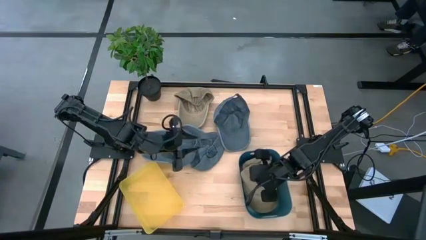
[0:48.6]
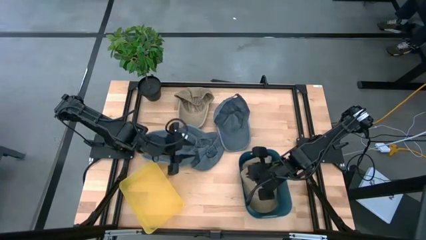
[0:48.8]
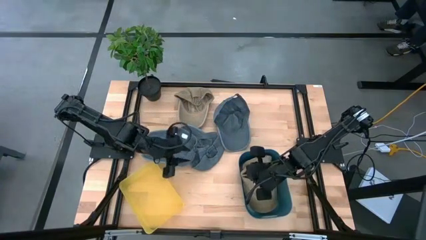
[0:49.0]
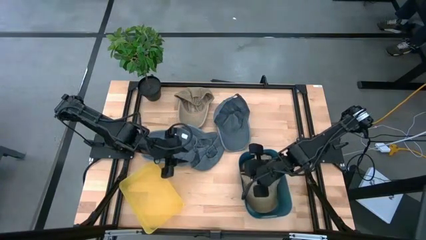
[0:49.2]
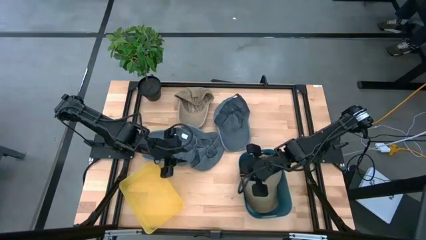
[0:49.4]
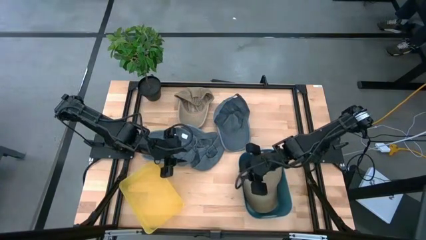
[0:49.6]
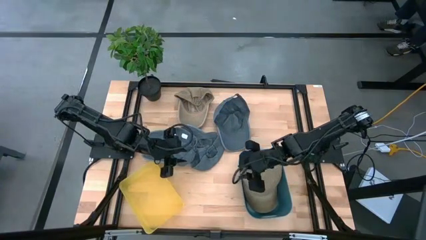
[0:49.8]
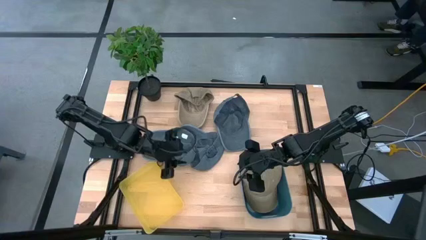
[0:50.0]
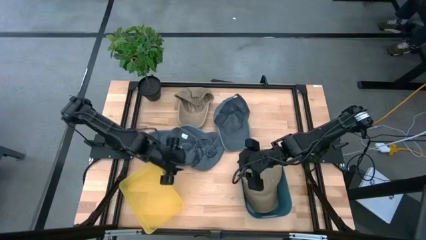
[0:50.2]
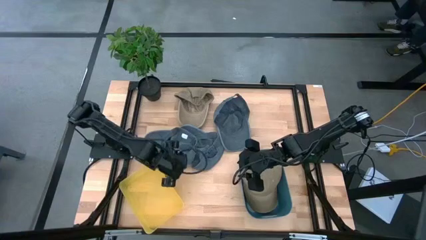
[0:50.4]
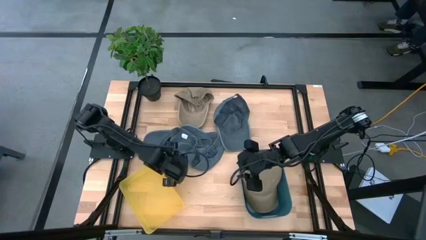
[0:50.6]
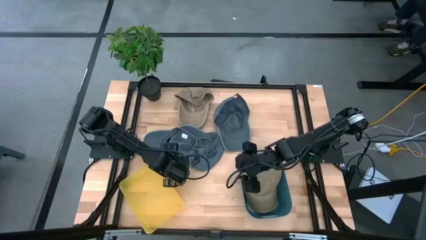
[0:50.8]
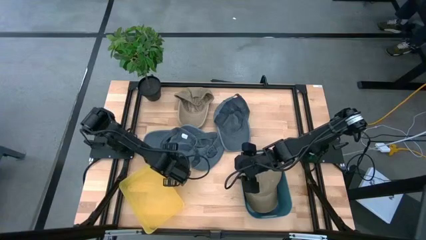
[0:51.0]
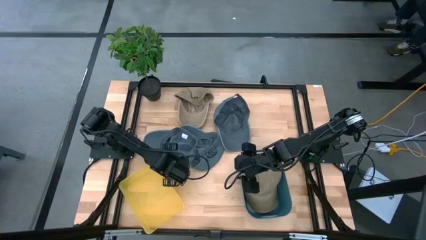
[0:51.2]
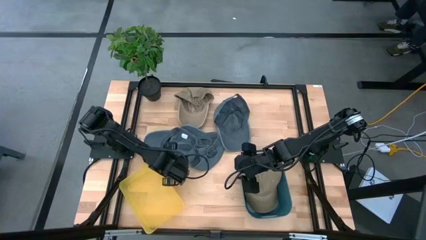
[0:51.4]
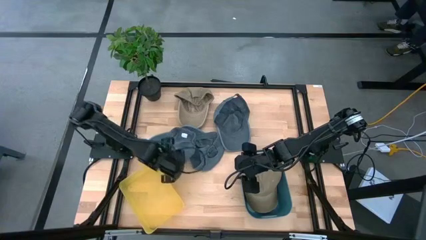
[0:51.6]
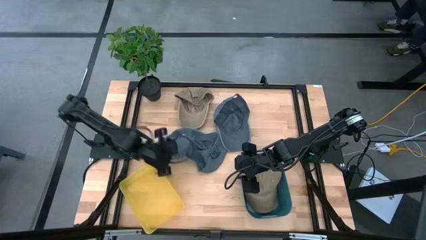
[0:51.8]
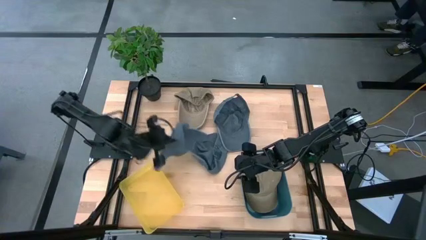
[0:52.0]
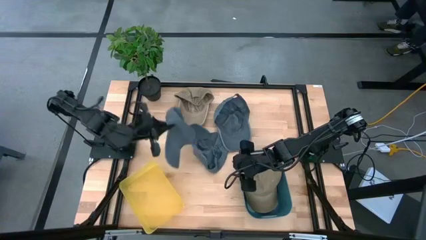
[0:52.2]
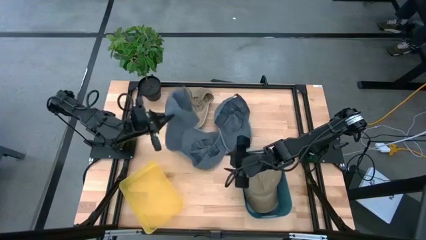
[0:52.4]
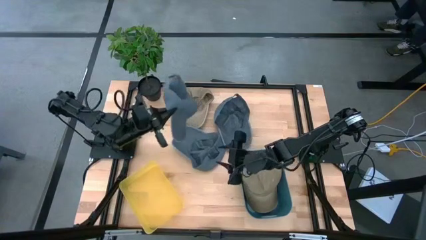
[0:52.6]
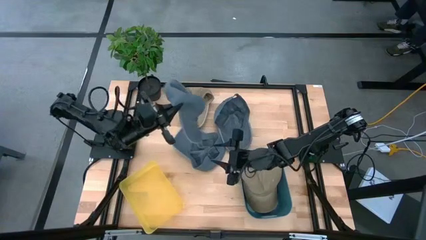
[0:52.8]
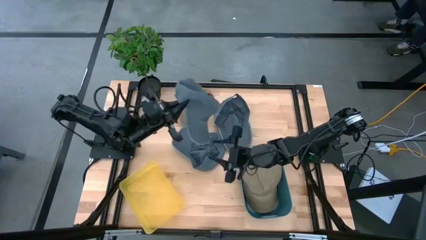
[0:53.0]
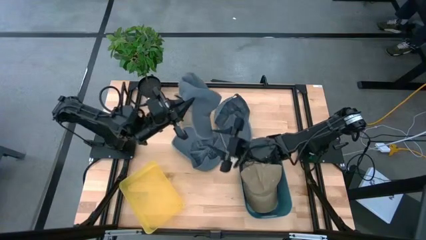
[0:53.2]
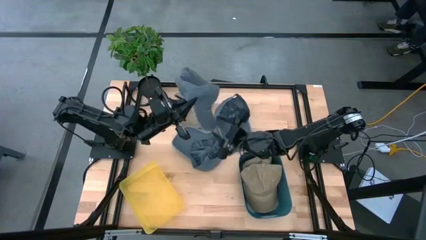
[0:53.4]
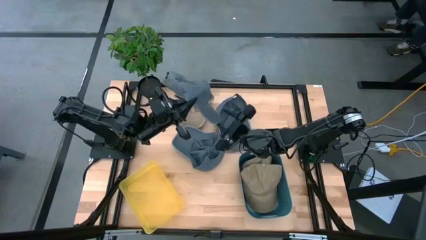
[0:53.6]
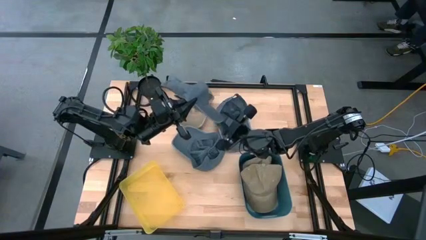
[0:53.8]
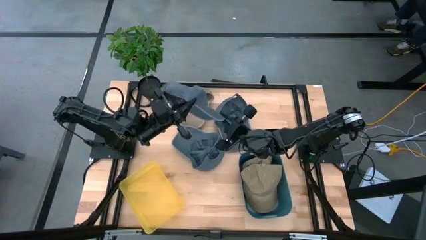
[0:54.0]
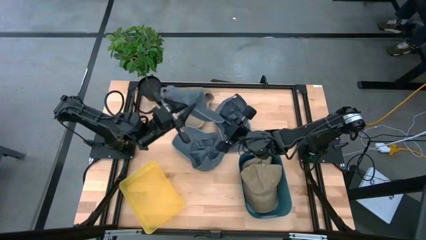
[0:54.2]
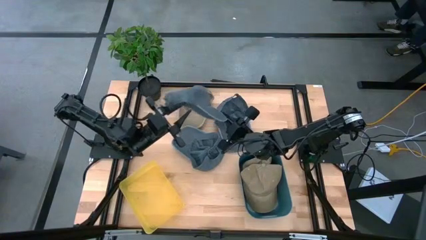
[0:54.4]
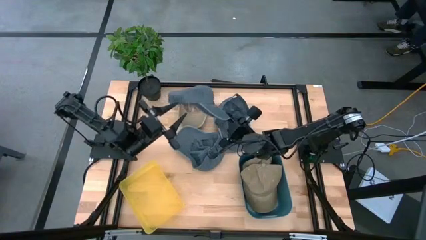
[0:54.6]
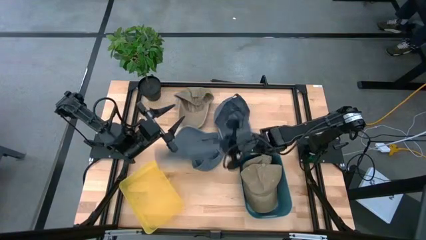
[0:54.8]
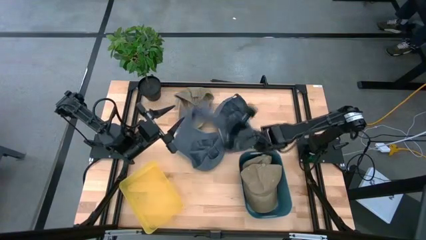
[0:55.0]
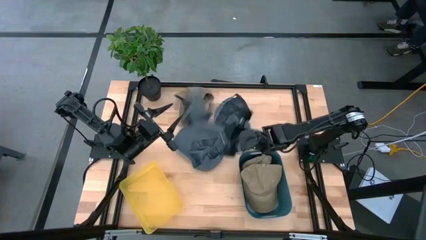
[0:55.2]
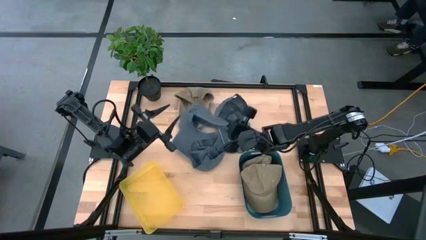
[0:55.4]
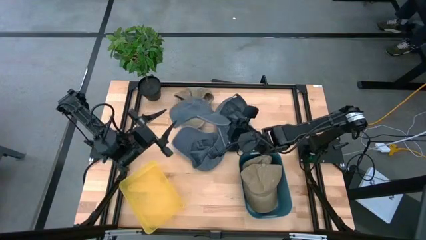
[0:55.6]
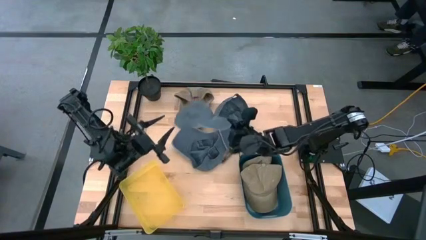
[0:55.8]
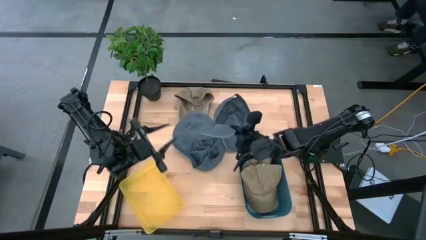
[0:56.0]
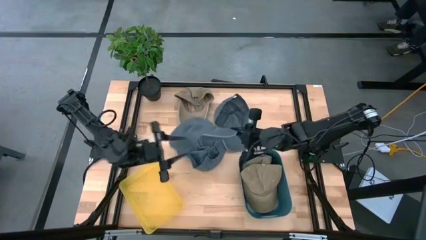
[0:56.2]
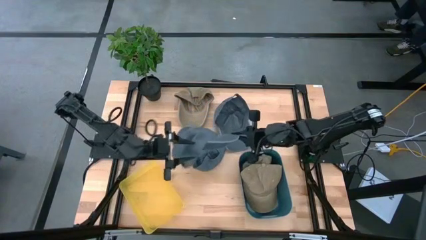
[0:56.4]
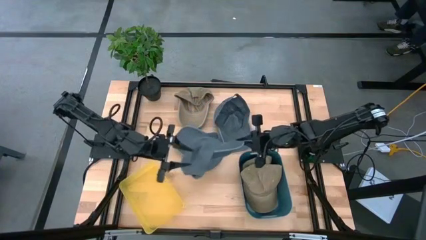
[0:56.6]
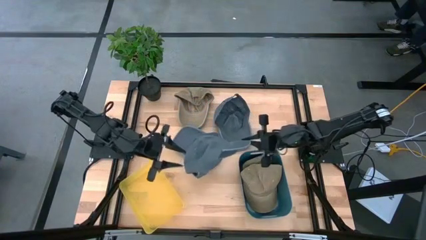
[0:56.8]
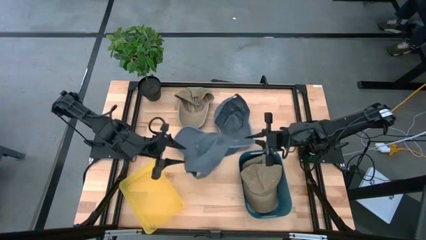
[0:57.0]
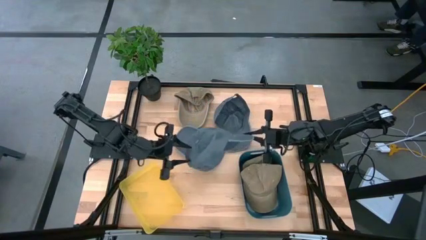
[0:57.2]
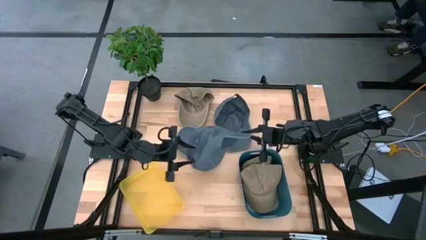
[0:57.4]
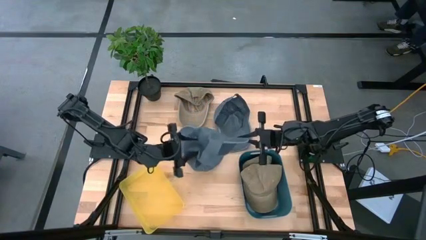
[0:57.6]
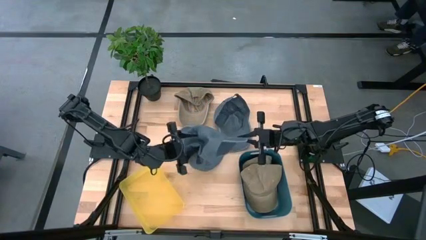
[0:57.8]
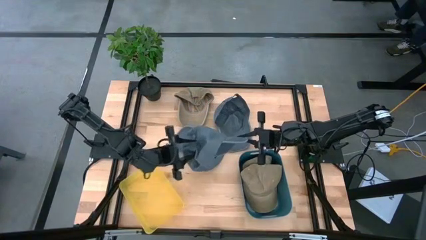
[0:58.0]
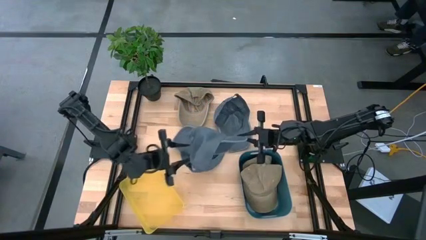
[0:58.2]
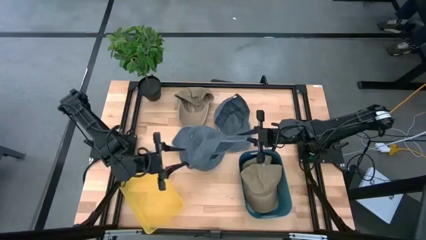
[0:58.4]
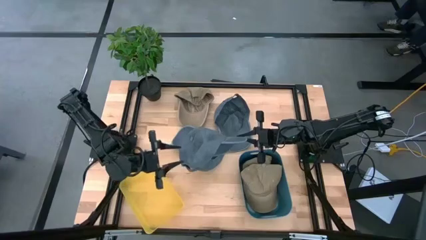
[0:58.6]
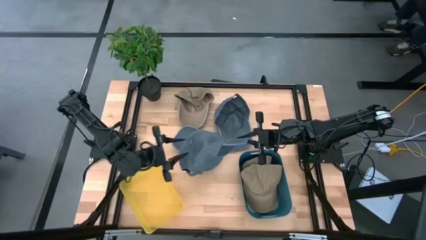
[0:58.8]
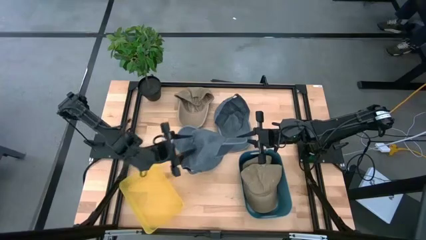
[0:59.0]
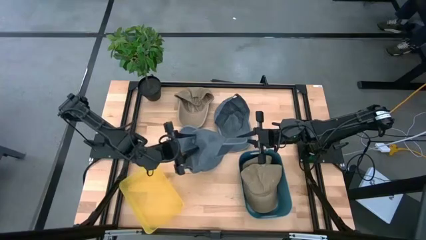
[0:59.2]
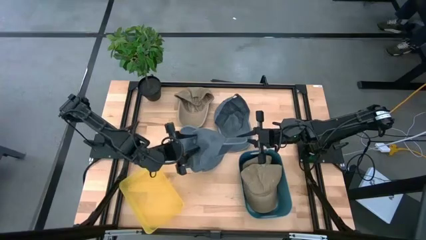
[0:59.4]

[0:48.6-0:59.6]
Task: Pick & Place hat
Put the left gray cap into the yellow bin

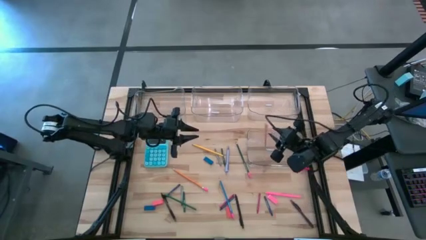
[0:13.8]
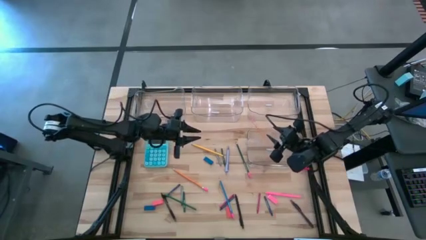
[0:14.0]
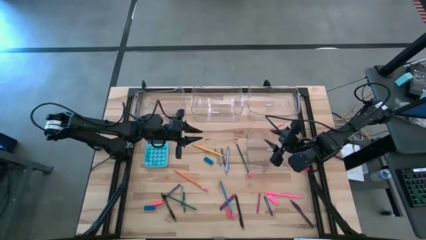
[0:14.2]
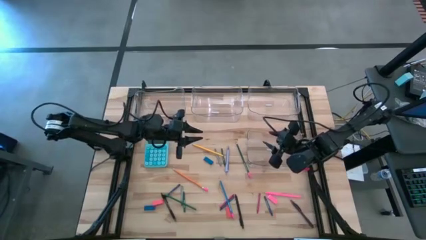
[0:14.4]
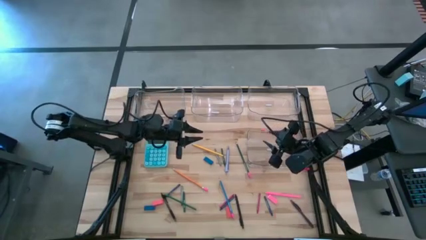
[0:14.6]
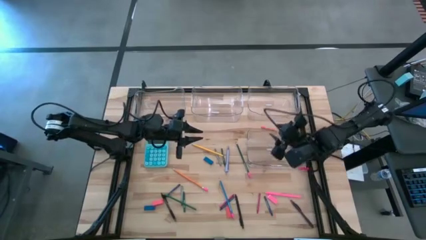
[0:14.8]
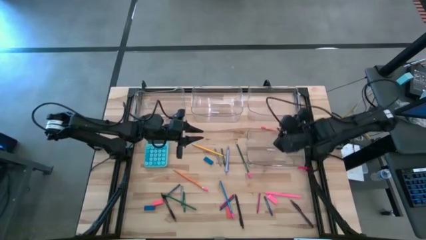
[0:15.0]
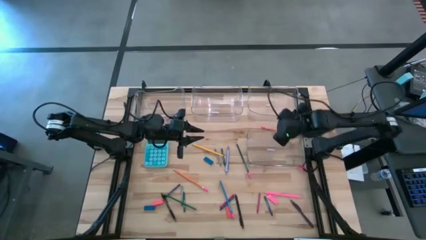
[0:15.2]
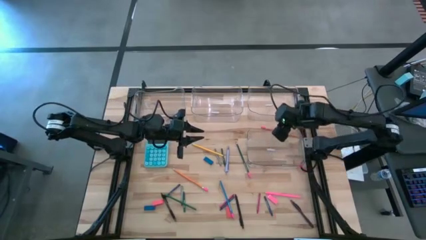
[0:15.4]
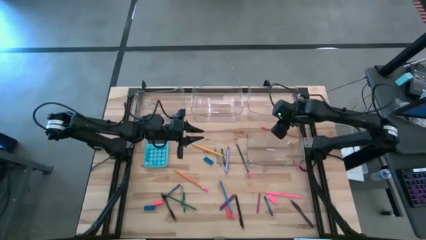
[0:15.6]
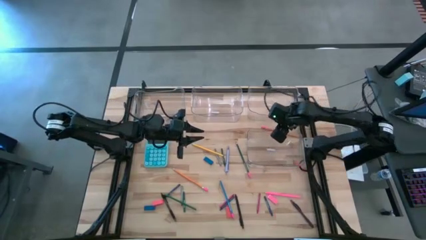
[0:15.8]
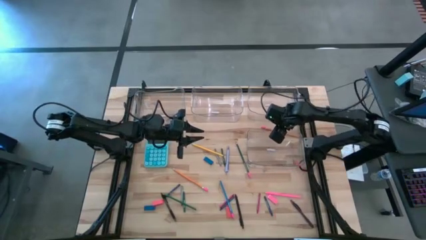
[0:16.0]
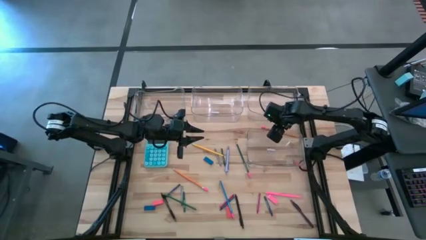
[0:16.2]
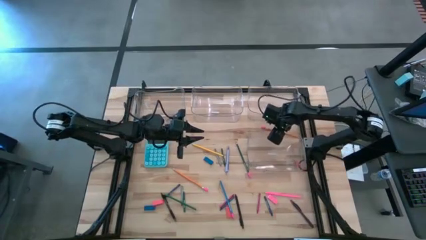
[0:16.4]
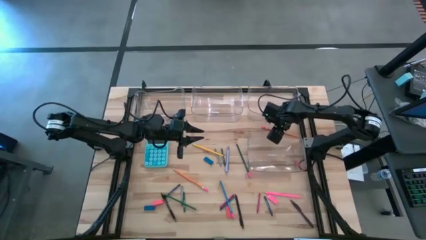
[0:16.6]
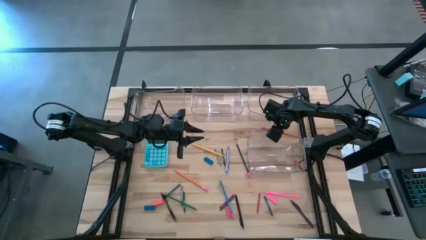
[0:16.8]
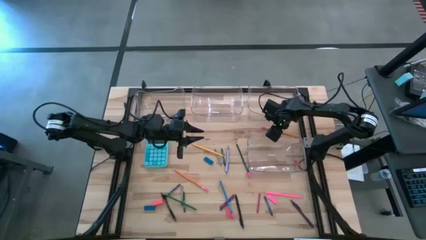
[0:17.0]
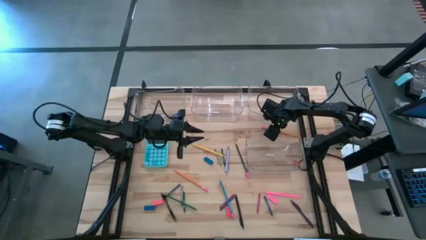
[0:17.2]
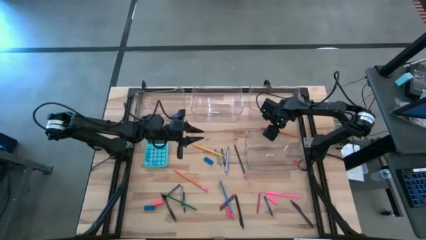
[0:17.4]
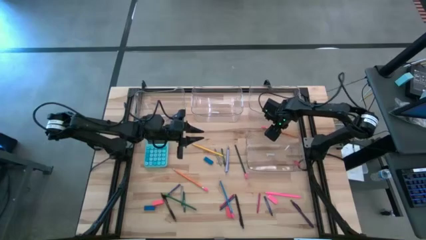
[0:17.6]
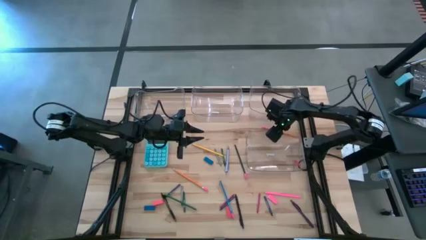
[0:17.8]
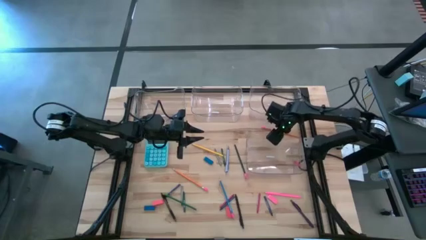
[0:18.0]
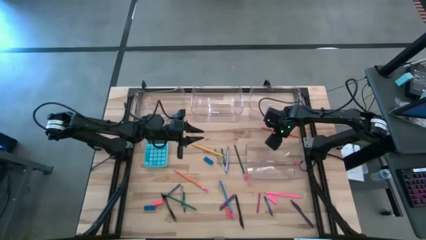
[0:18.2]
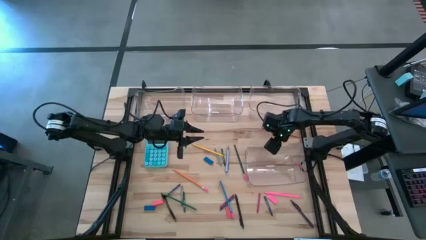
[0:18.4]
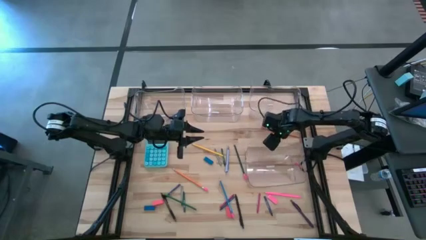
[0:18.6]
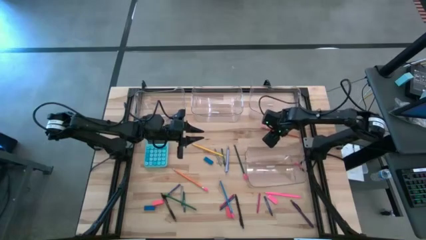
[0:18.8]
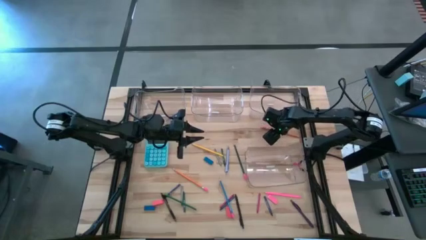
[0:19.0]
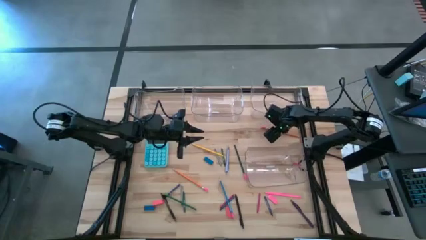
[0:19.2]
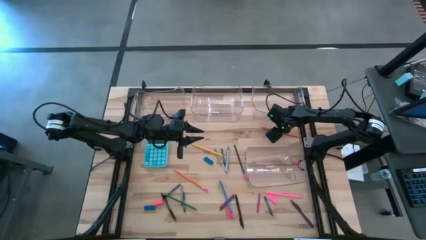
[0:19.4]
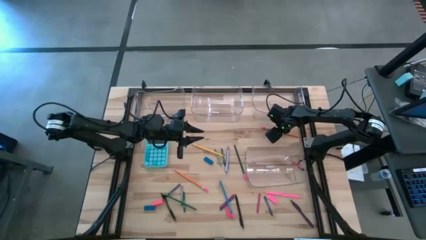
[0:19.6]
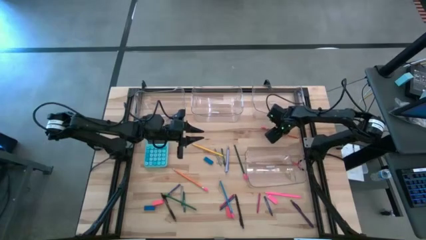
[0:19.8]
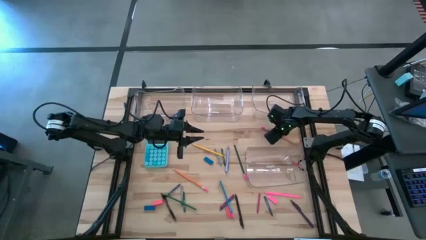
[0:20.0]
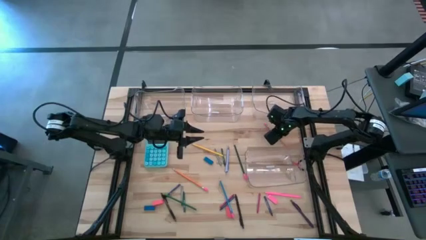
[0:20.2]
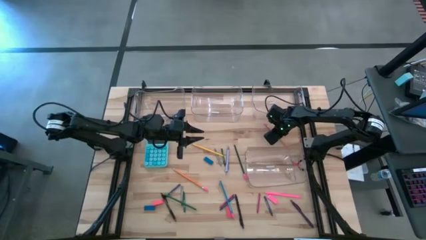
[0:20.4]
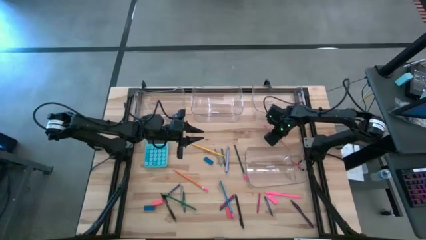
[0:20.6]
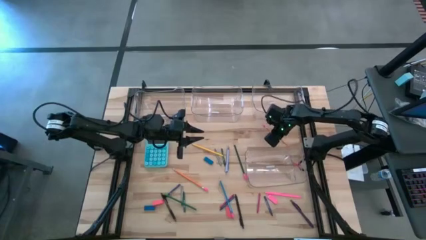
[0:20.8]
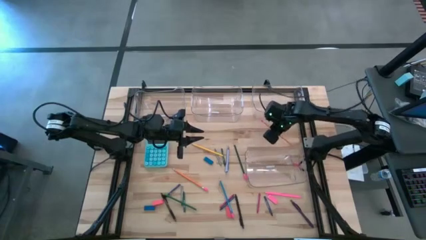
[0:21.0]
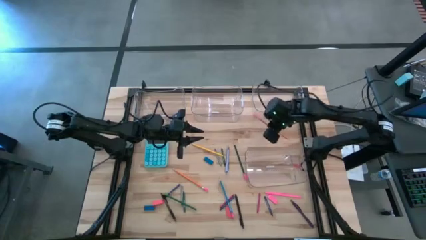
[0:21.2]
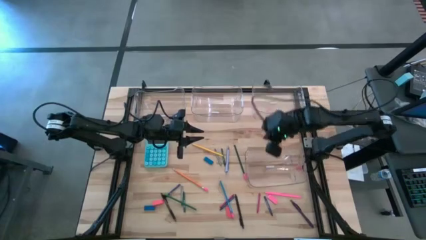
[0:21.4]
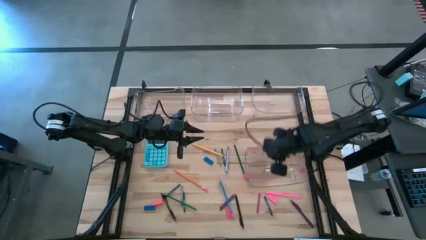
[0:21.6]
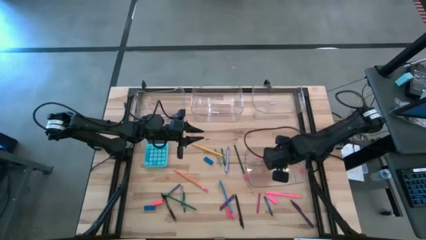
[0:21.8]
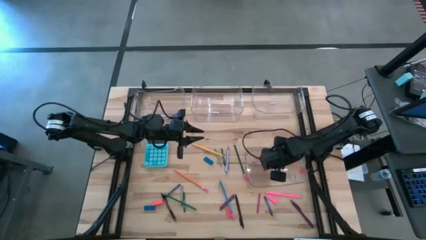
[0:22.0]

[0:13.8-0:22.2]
Task: Sort crayons/erasers/pens/pencils in bins
Put the top orange pencil into the bottom transparent bin
